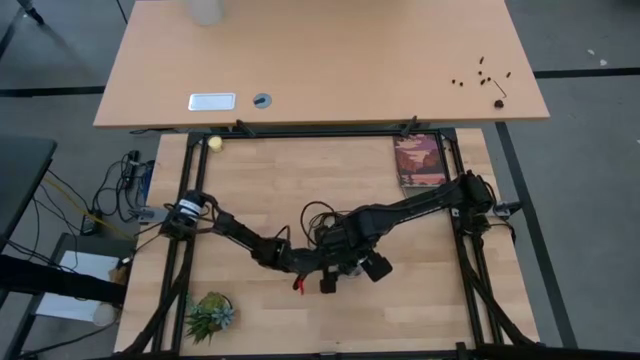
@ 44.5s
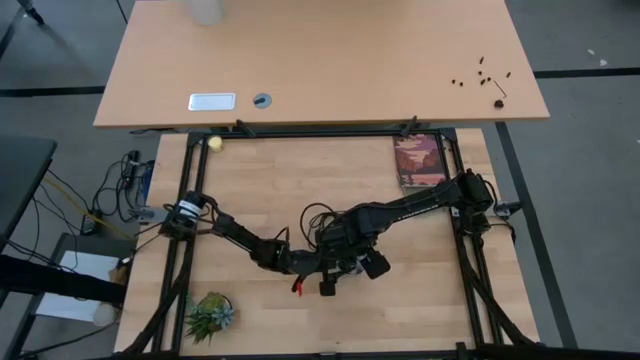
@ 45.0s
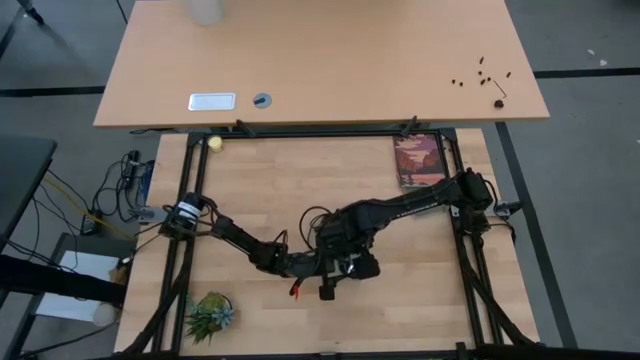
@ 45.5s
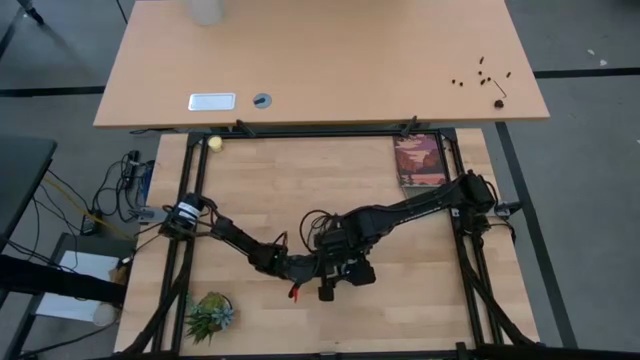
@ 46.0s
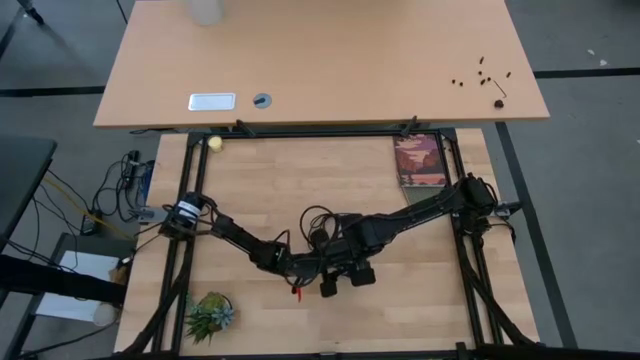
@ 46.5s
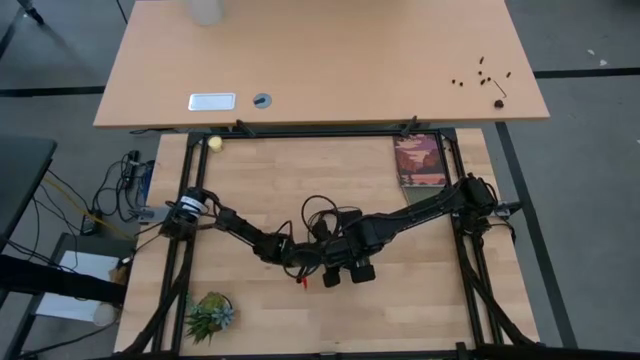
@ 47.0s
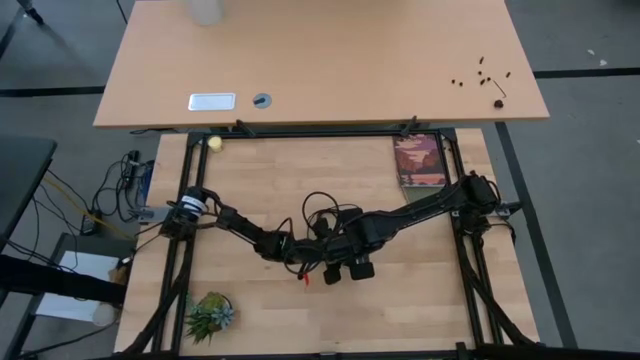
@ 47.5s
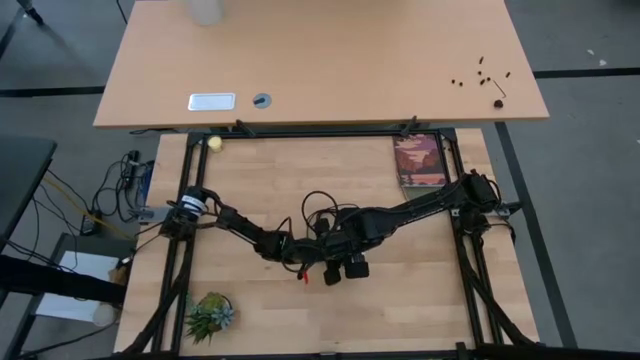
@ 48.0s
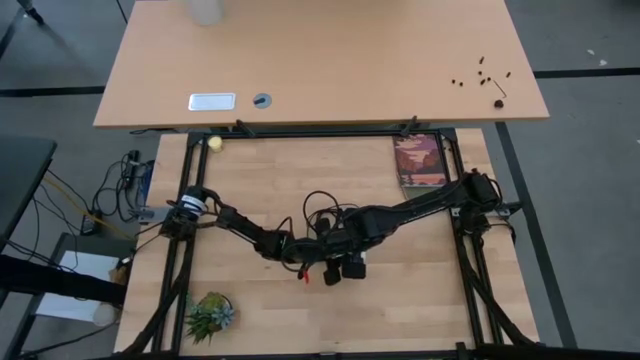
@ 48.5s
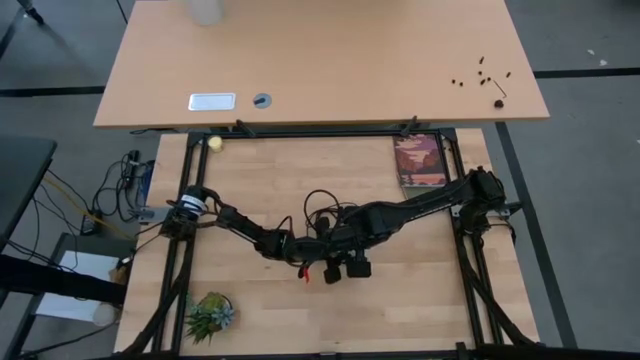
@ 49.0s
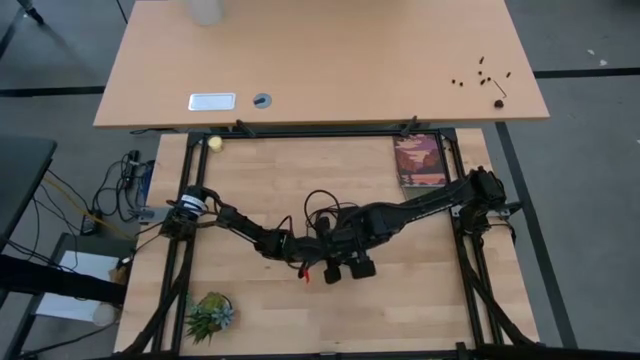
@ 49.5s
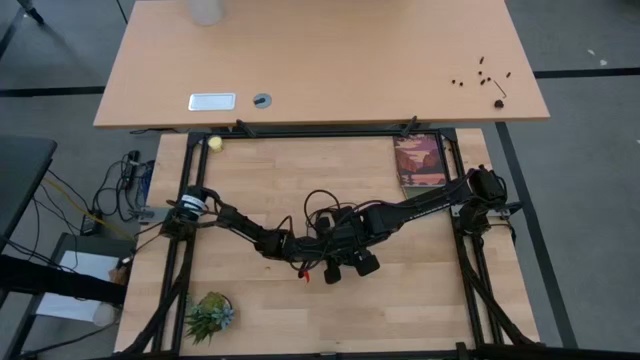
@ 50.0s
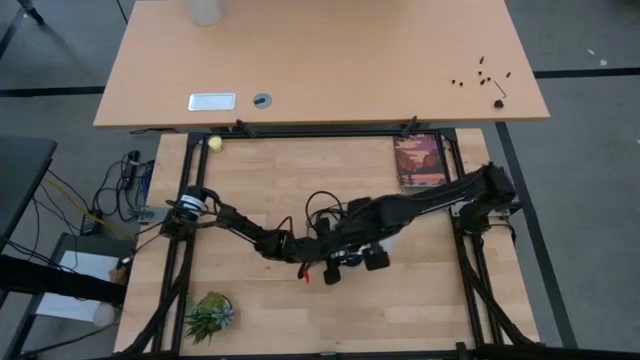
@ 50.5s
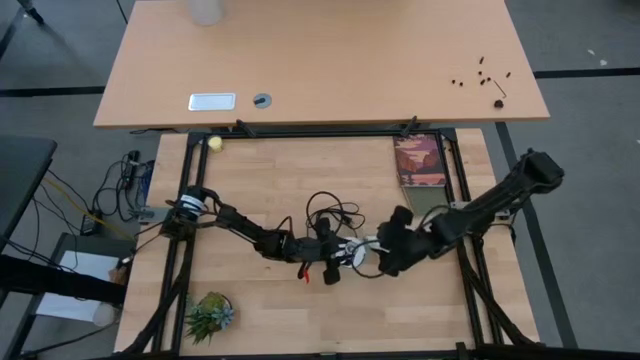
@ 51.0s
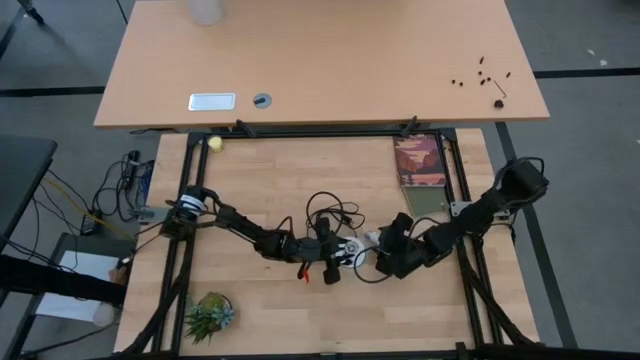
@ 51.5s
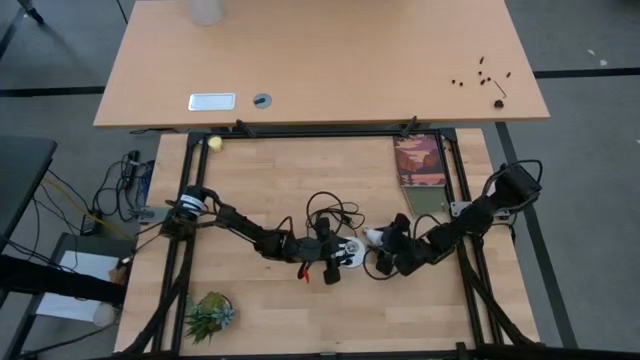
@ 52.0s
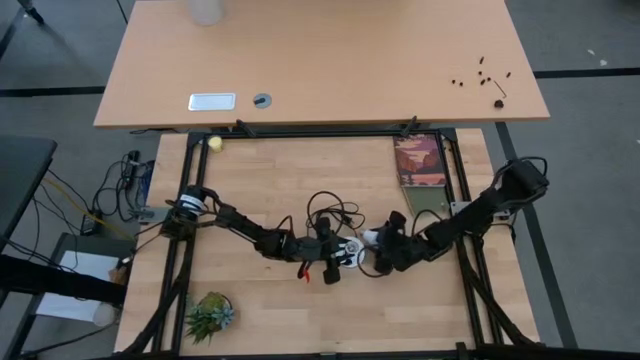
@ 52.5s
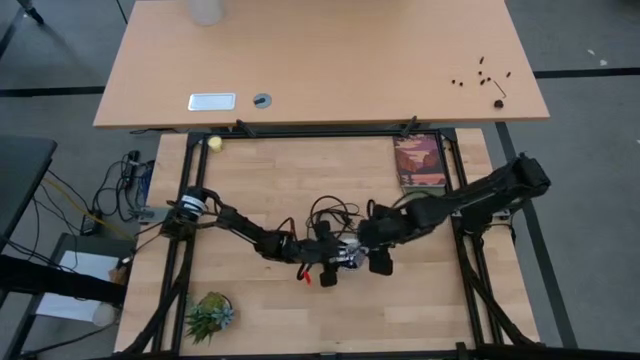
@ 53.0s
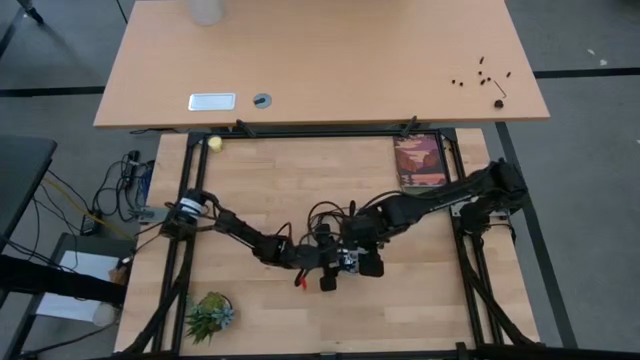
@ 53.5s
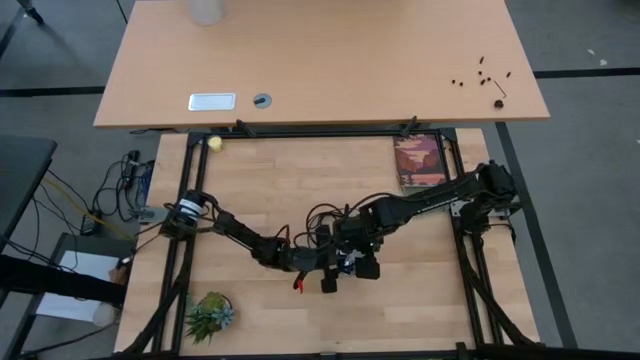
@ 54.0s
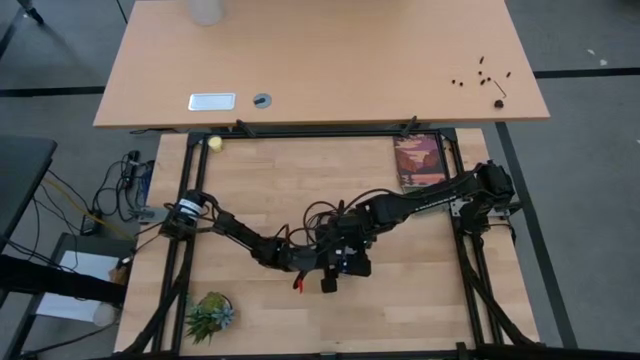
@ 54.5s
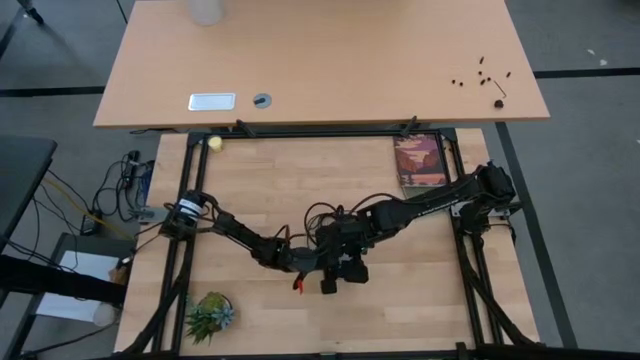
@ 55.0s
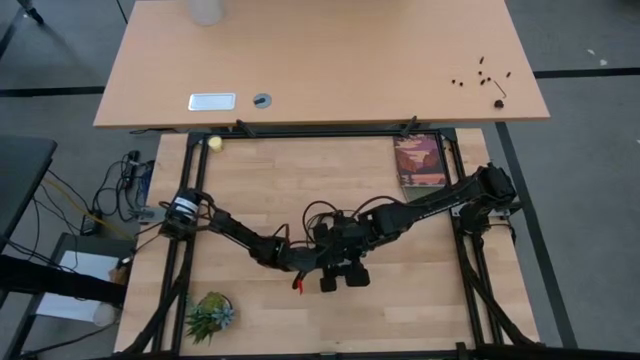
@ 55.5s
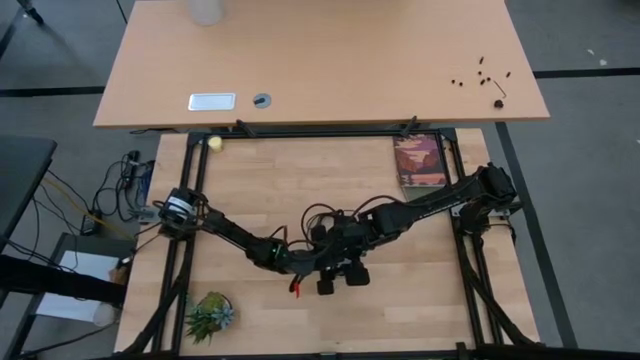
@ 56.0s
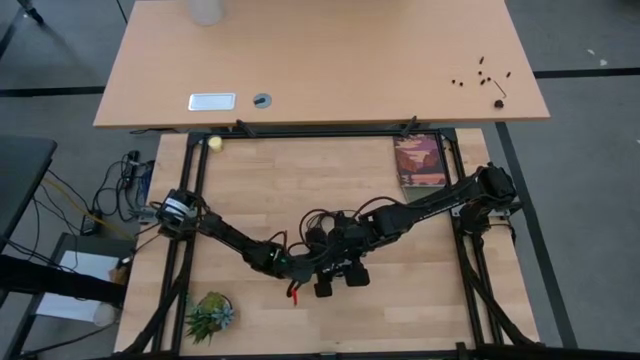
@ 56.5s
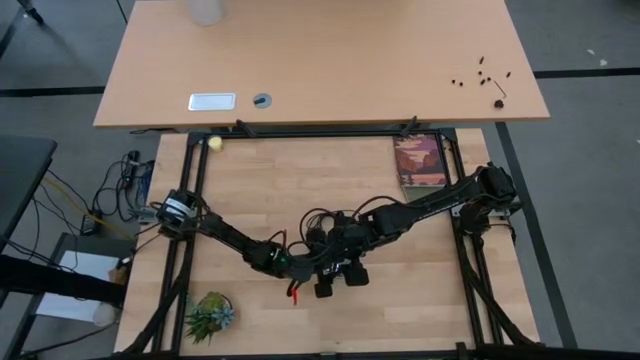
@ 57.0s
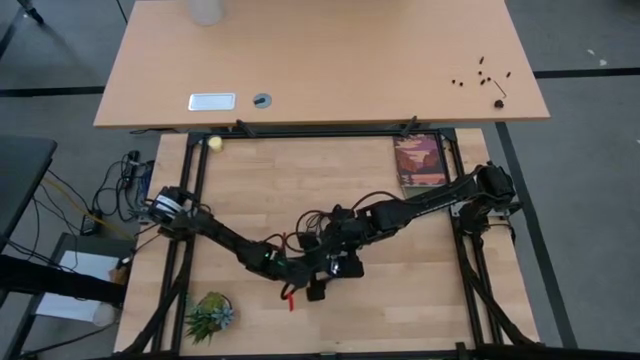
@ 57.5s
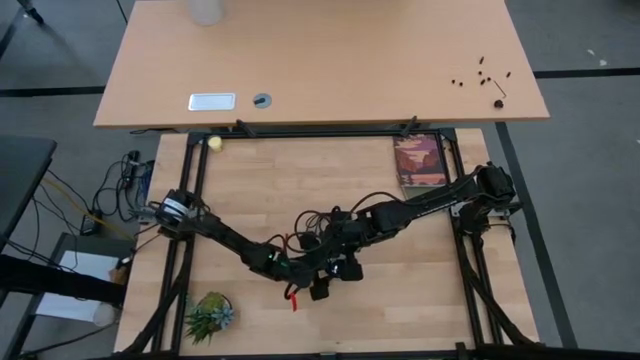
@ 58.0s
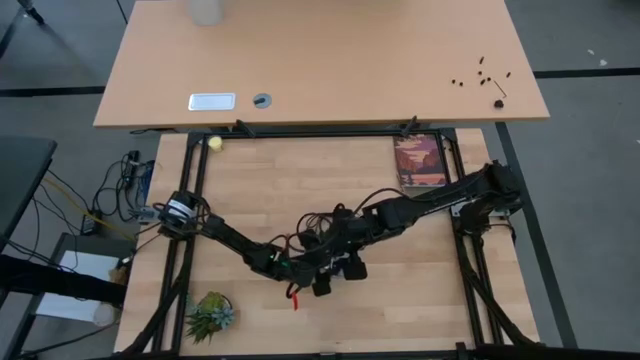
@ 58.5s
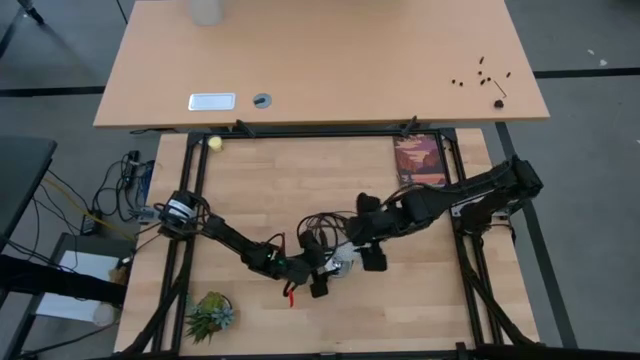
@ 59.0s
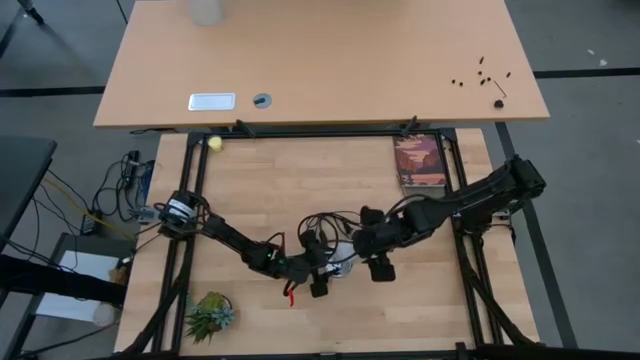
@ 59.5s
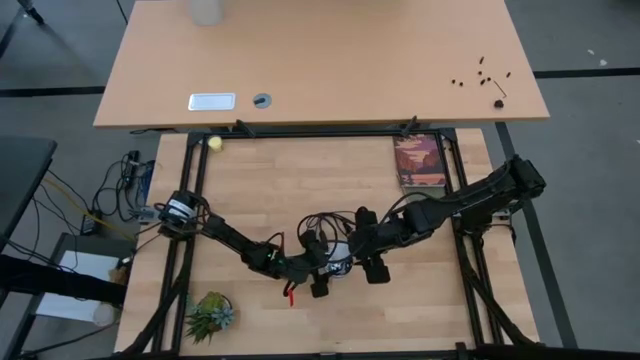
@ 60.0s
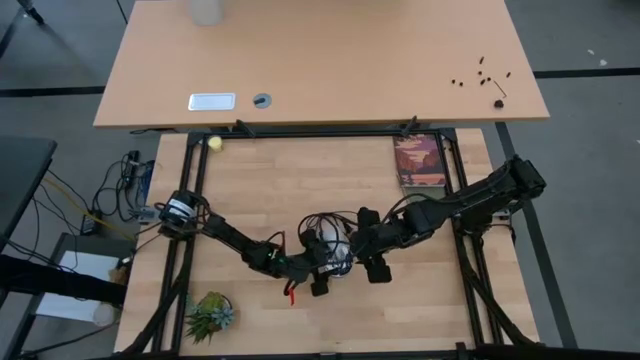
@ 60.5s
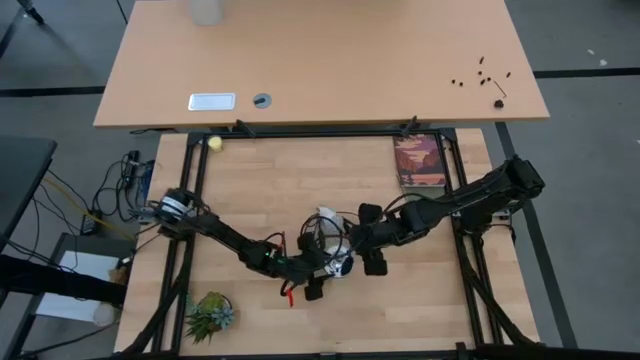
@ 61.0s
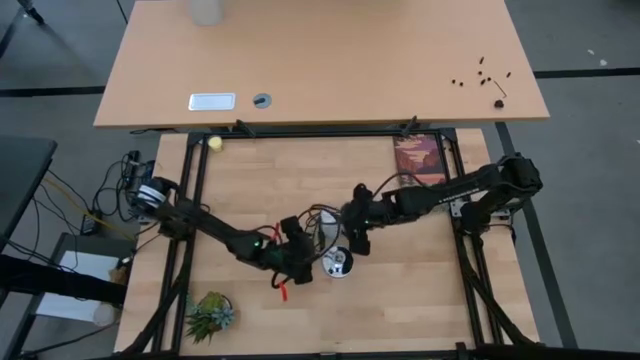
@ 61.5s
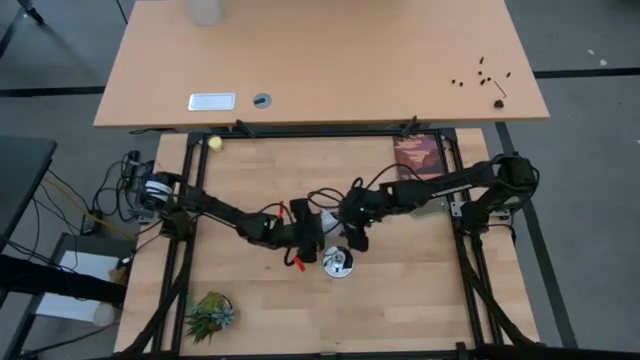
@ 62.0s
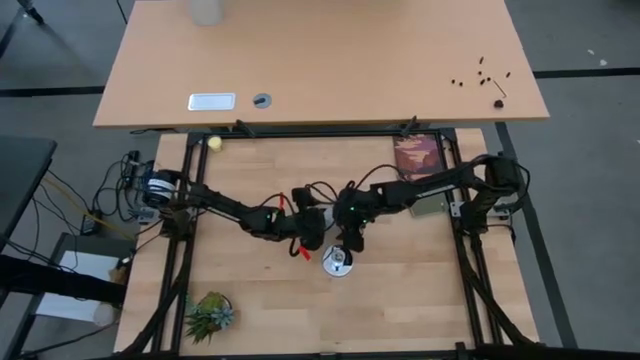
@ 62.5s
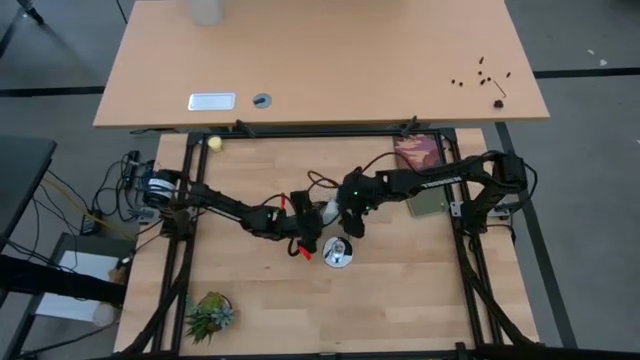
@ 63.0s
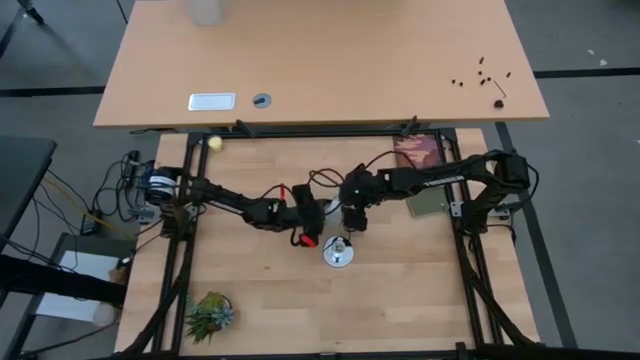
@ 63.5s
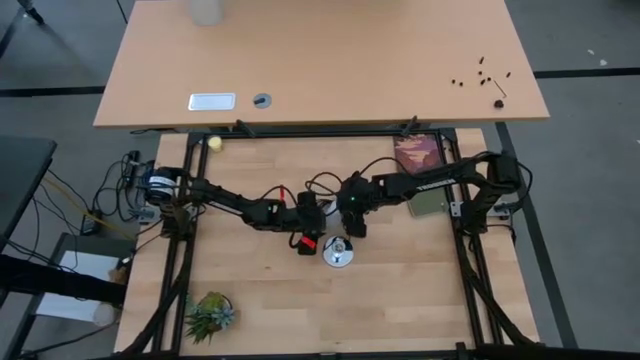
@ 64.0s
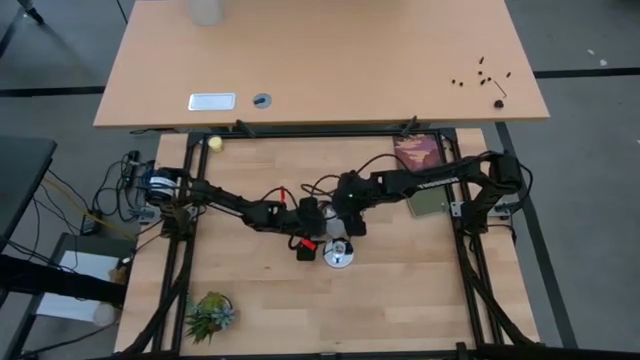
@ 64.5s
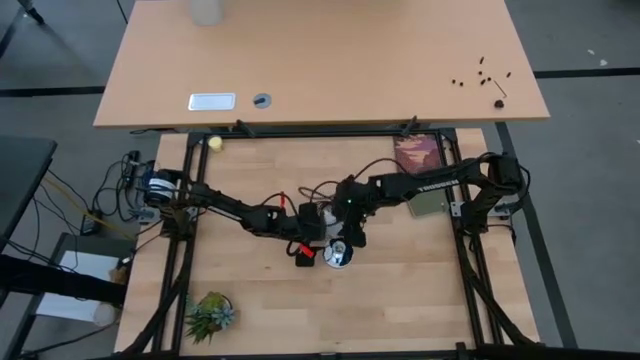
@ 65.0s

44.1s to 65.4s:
Task: Screw lightbulb
Insert the lightbulb into the silver lamp

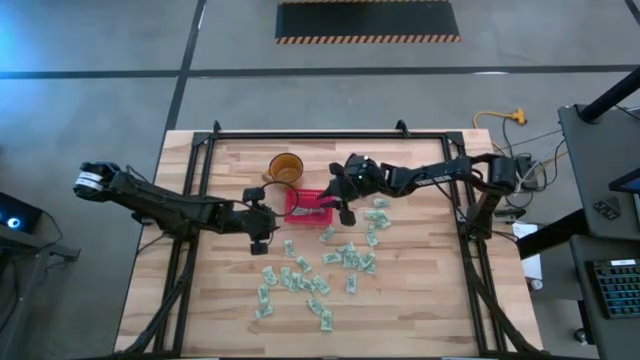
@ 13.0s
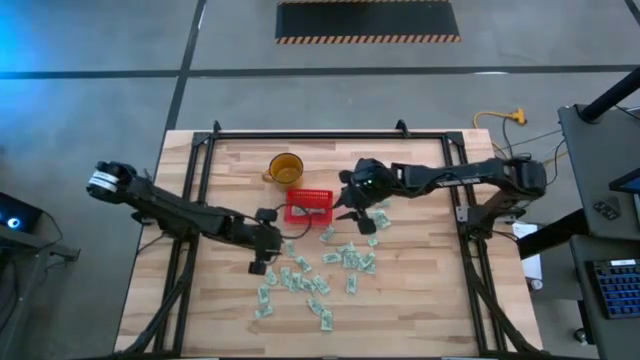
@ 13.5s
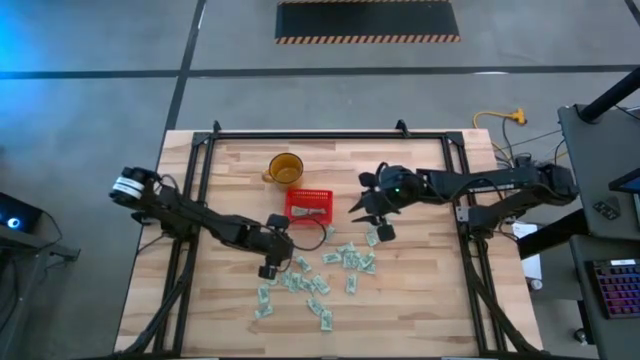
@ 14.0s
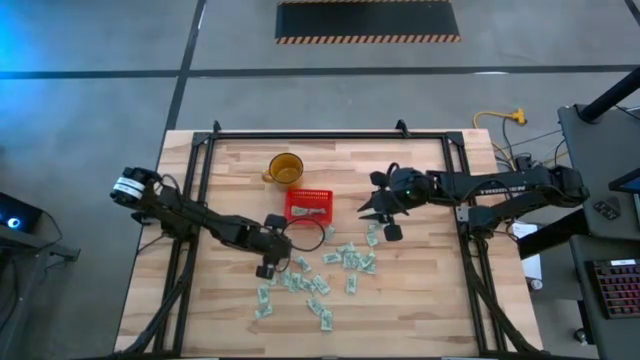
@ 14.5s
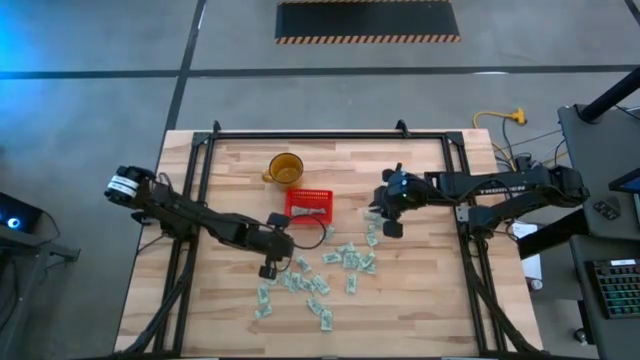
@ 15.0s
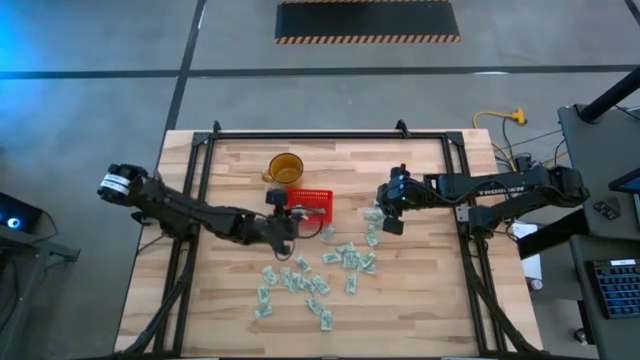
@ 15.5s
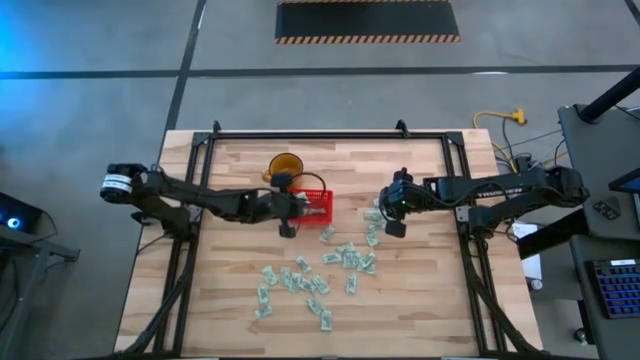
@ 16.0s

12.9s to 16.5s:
Task: Pick and place Stevia / Truvia into bins
Put the gray stevia packet into the red basket
